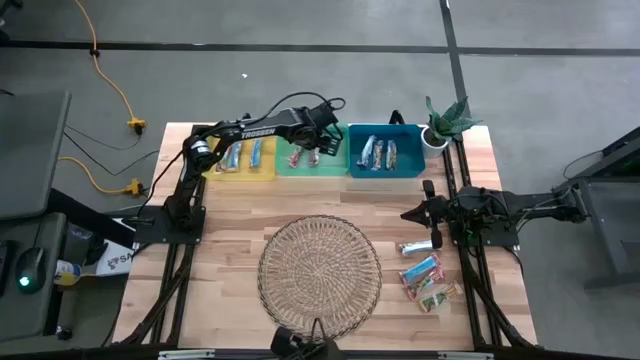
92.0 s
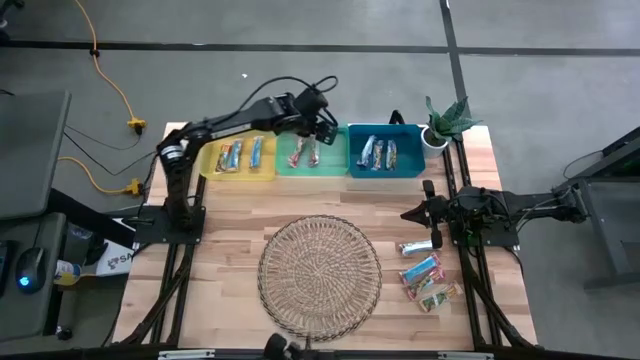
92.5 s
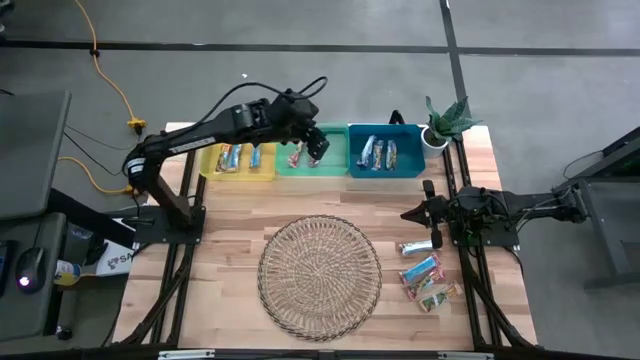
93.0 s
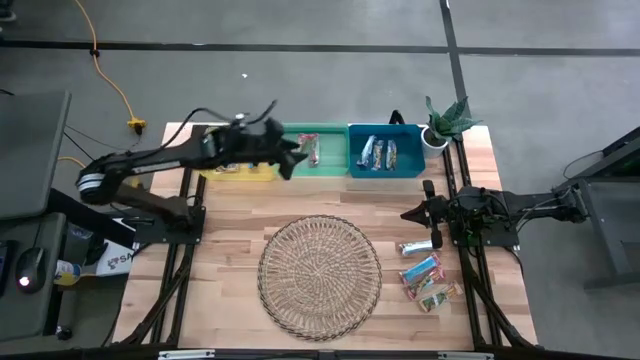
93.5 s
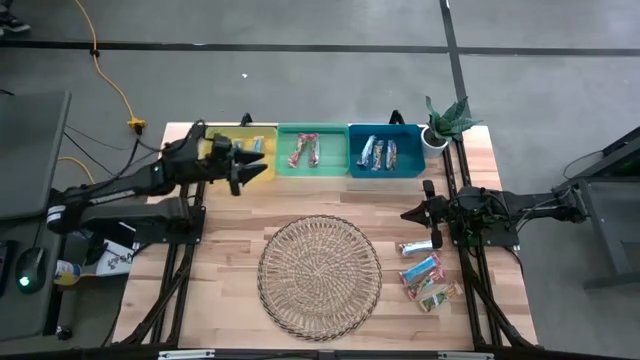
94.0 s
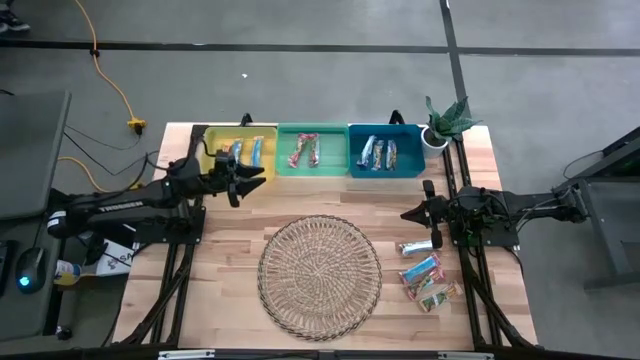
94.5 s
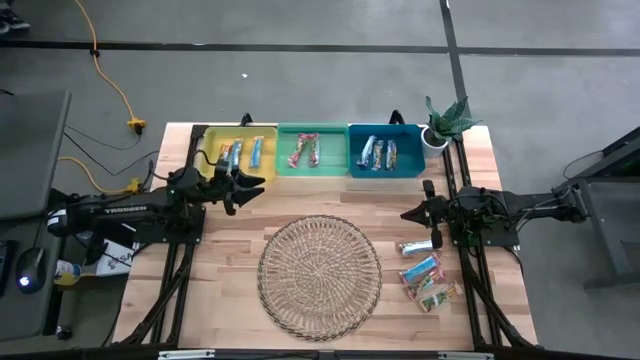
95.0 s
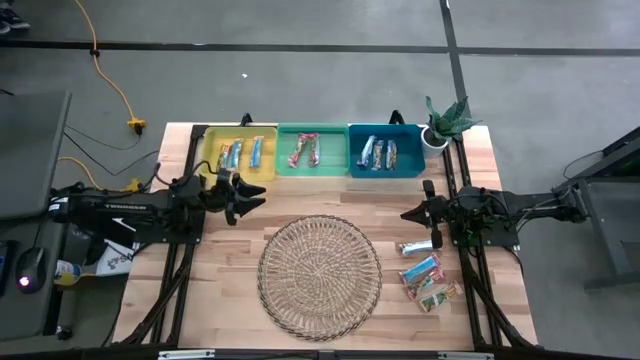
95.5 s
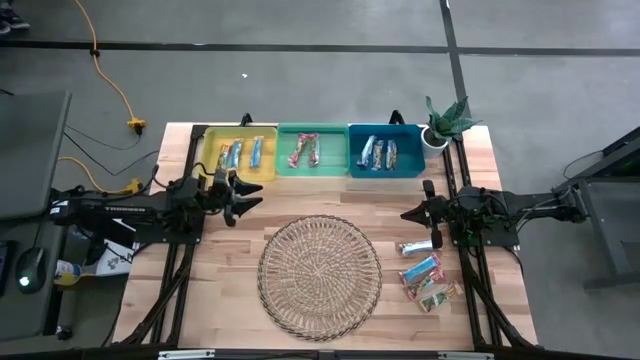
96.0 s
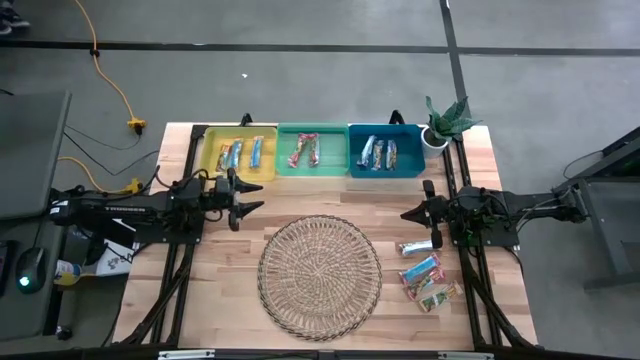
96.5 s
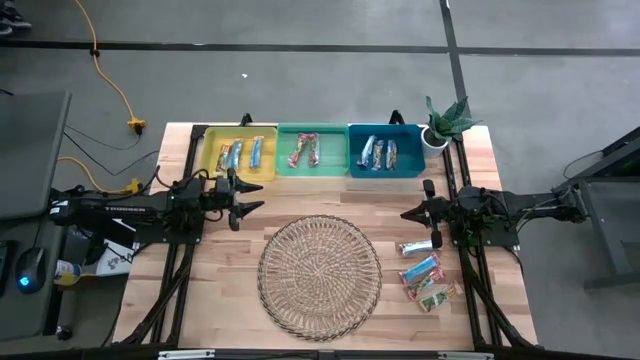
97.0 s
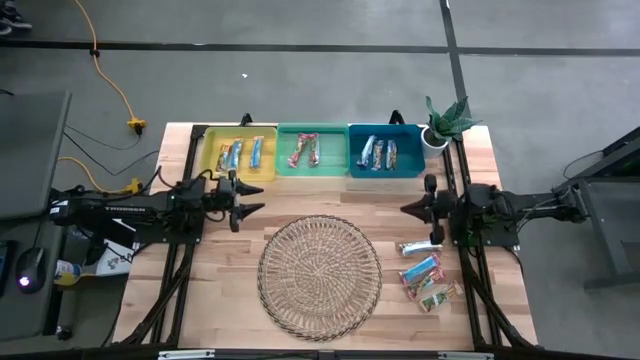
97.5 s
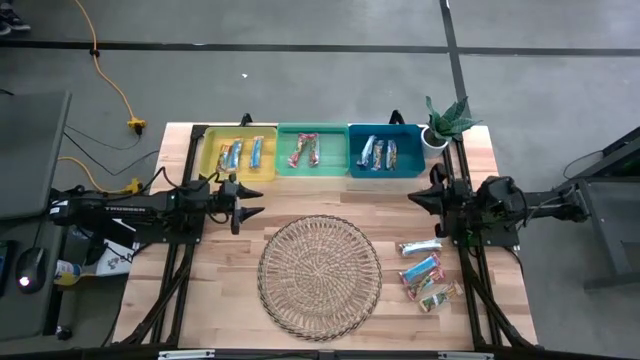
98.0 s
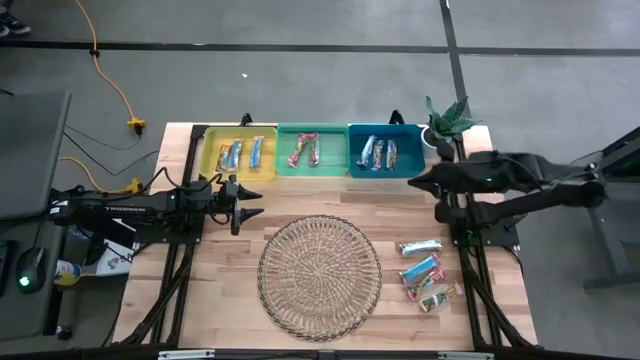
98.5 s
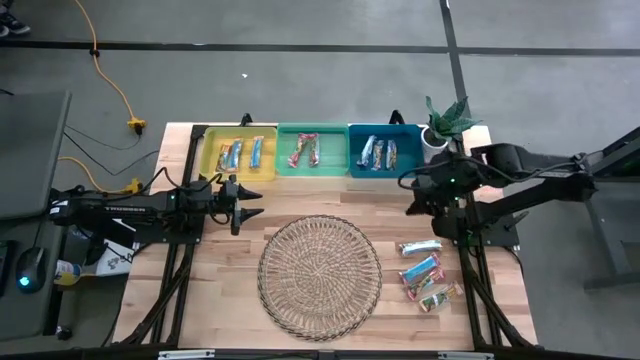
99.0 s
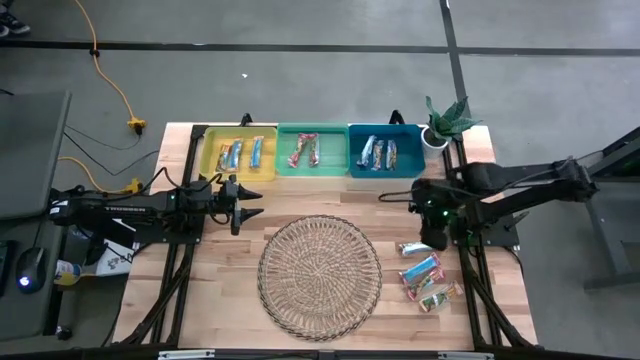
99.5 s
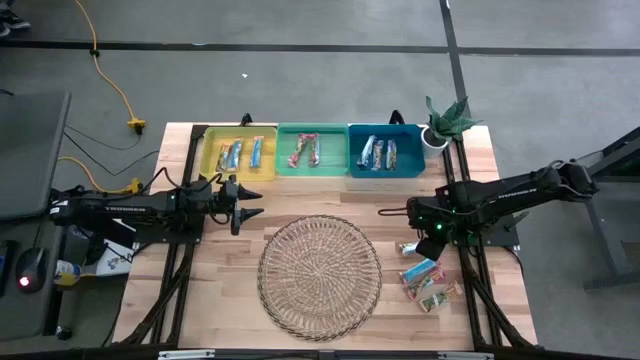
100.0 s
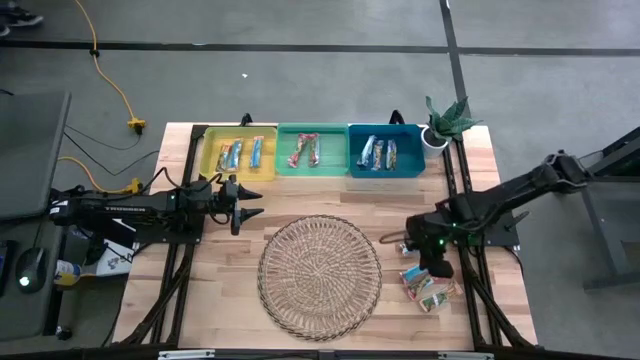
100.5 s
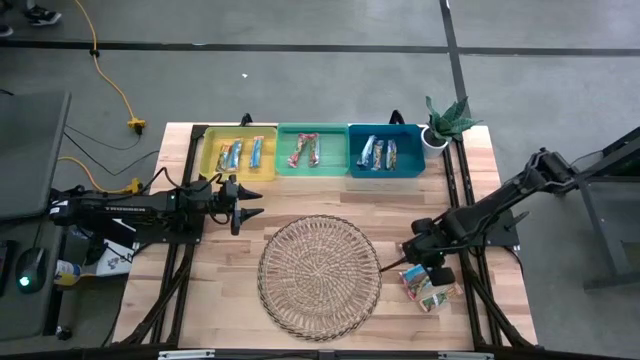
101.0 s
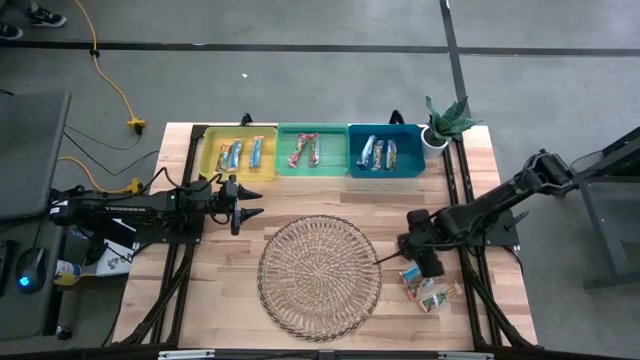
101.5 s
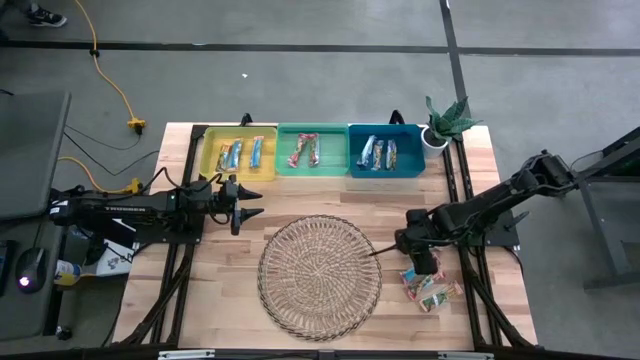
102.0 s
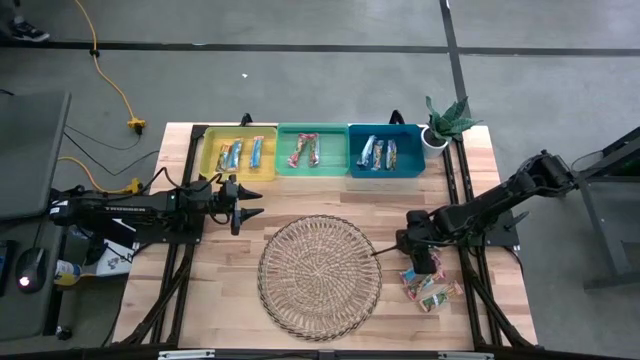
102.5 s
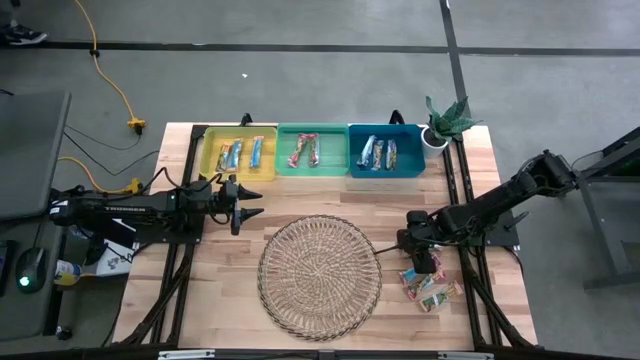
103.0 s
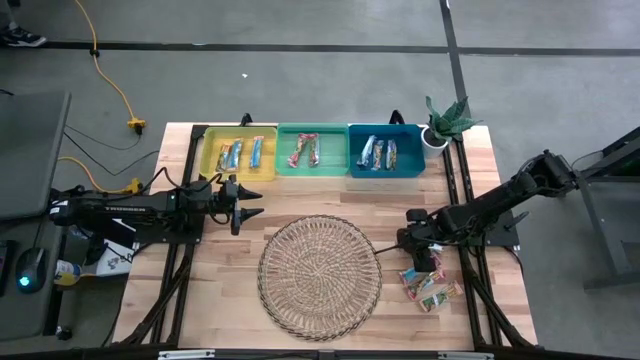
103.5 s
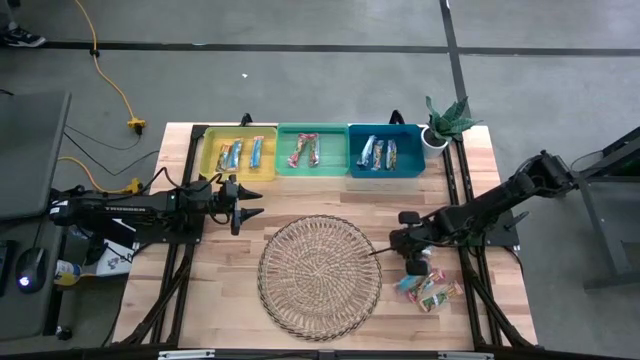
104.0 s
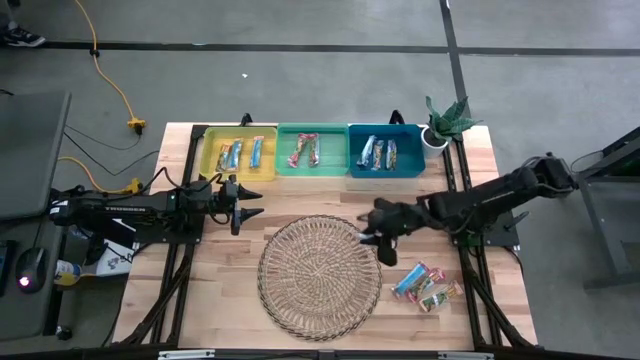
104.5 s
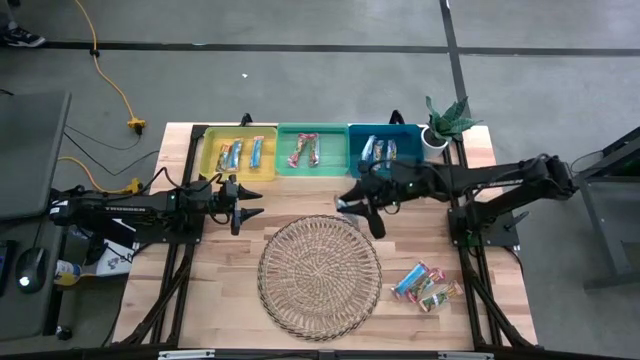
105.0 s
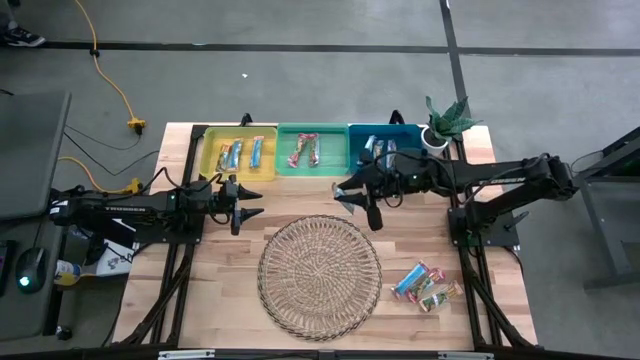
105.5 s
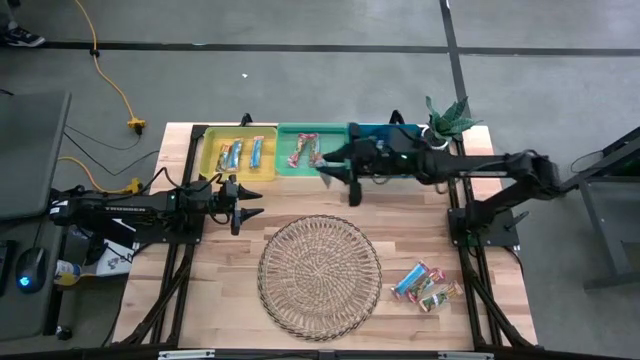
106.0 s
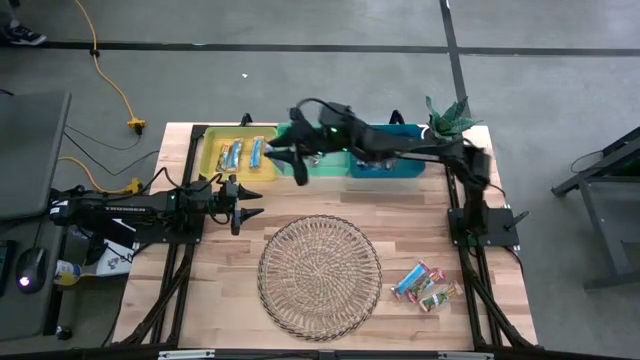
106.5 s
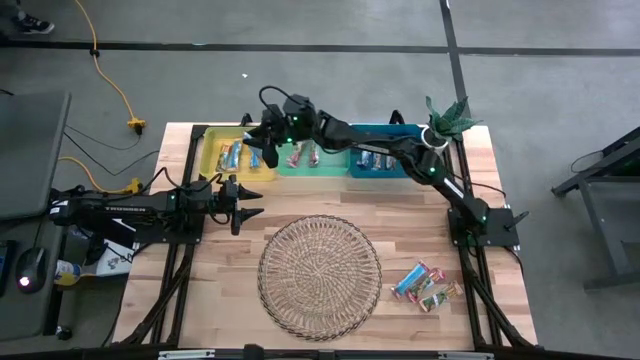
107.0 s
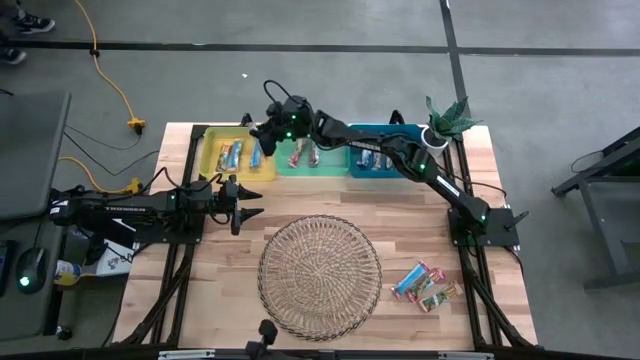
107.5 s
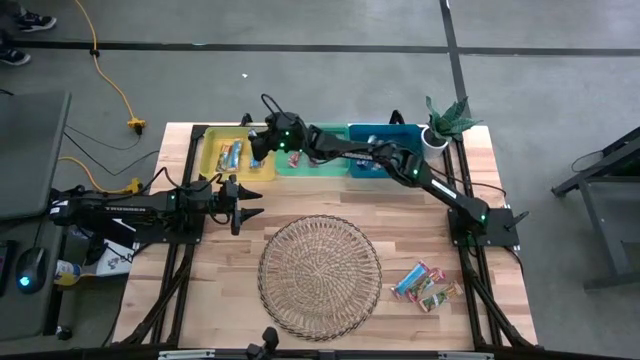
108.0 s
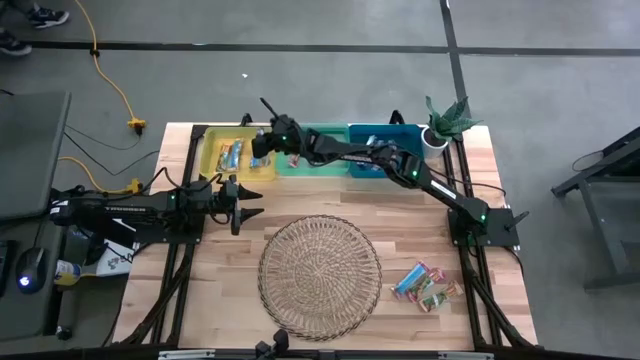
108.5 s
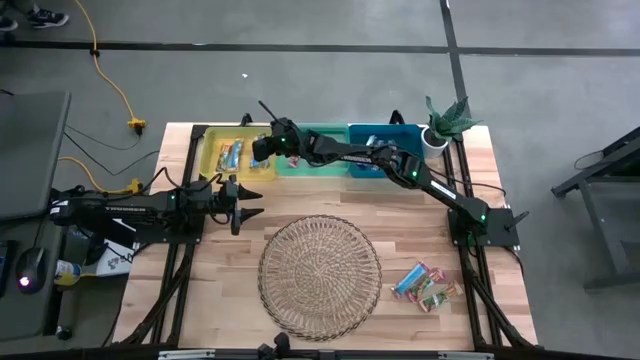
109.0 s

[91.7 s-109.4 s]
Task: Pick and place Granola Bars by type
Put the yellow granola bar into the yellow bin

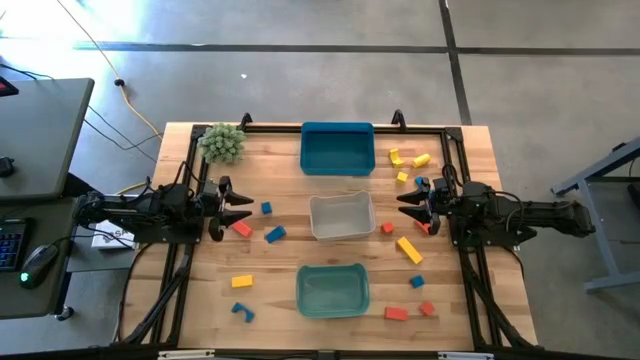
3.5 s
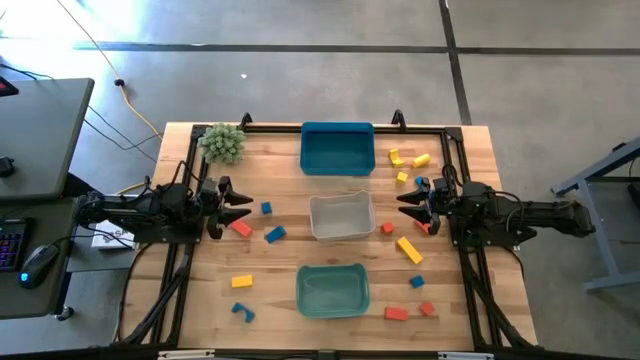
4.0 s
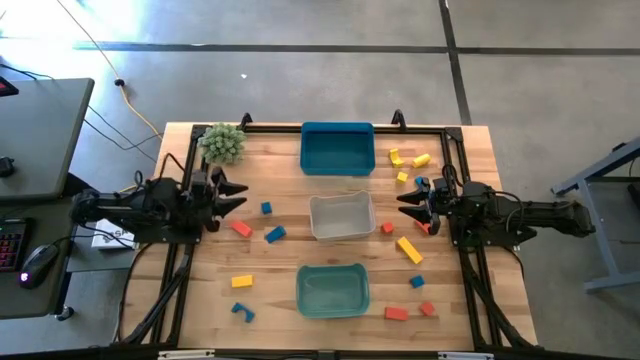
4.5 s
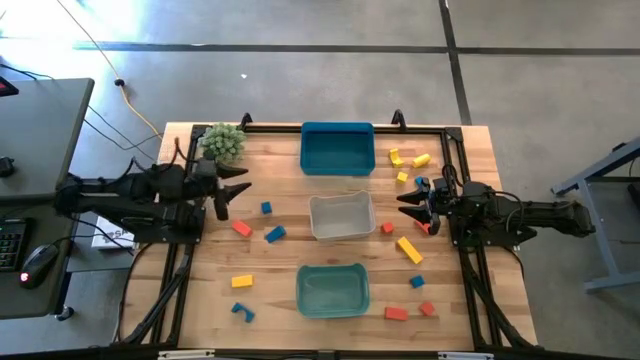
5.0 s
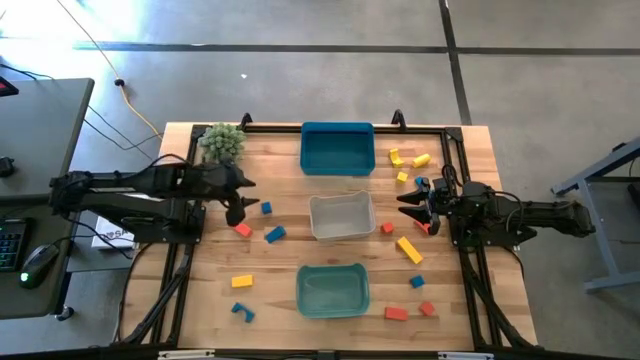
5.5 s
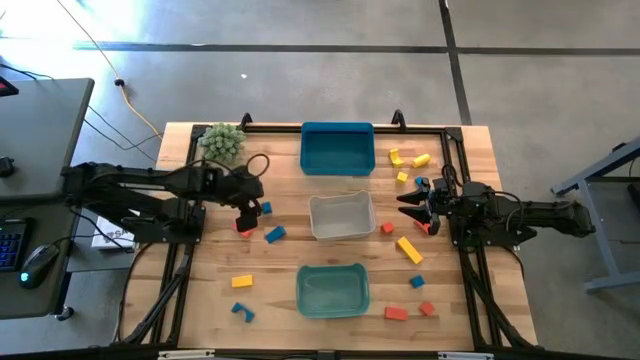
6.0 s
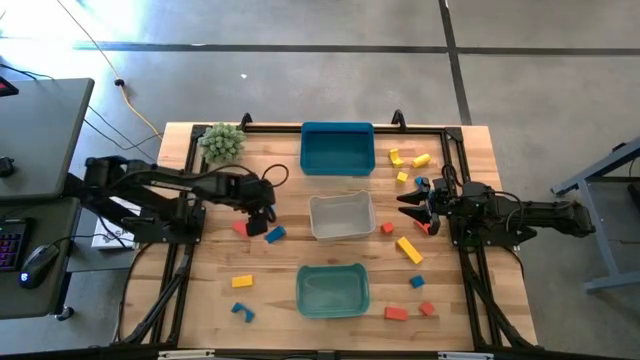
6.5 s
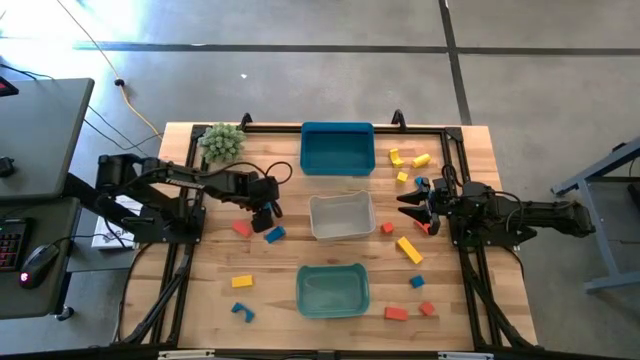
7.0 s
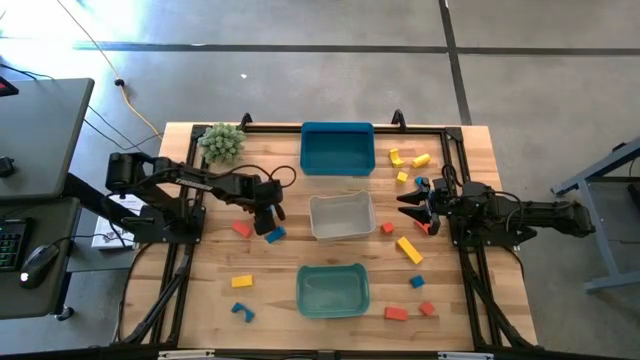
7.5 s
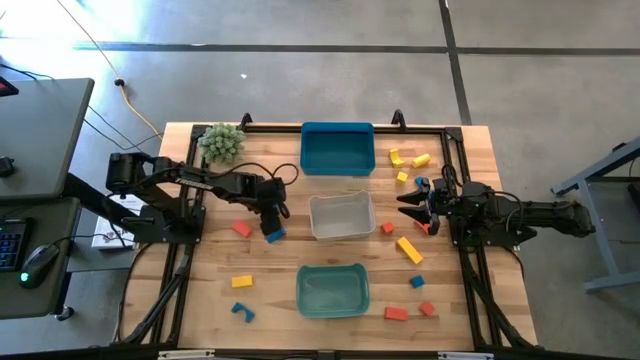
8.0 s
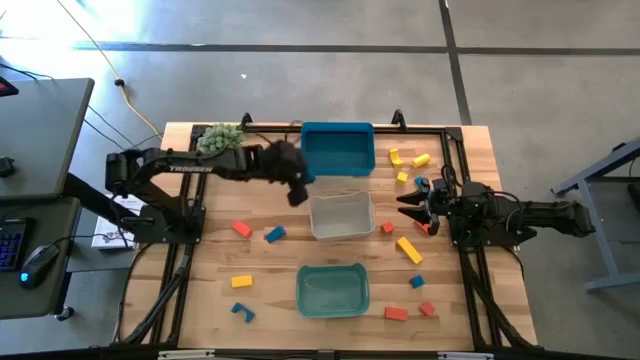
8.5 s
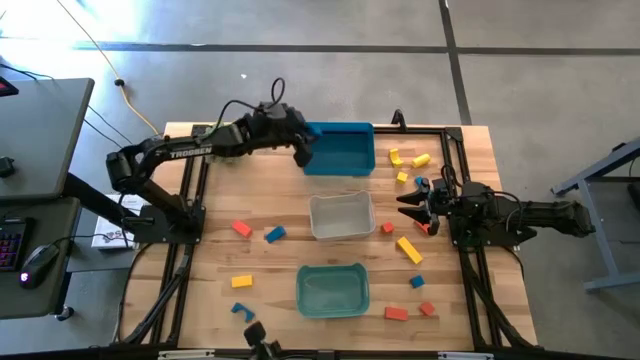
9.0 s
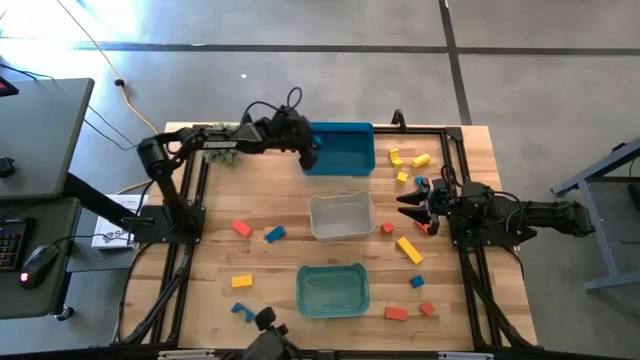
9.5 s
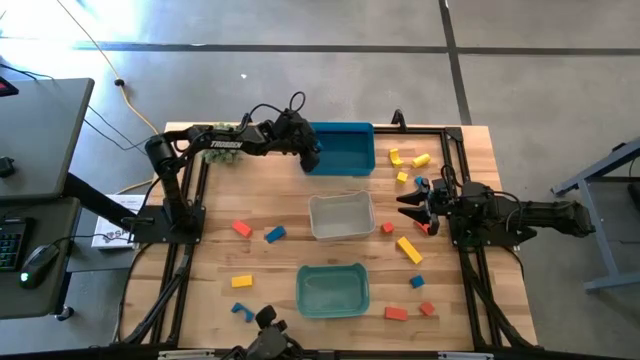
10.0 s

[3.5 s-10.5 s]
Task: Sort & place blocks by color
Put the blue block into the blue bin
